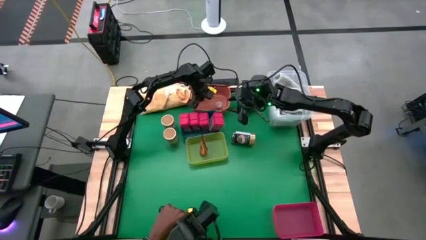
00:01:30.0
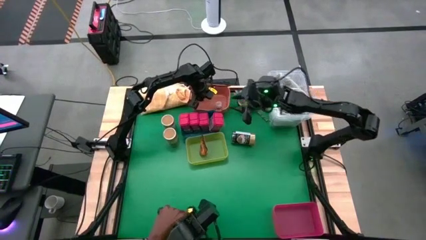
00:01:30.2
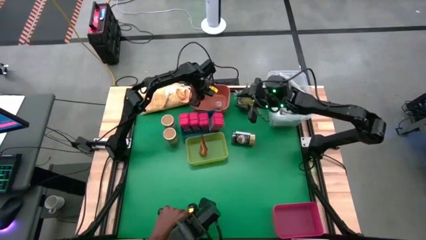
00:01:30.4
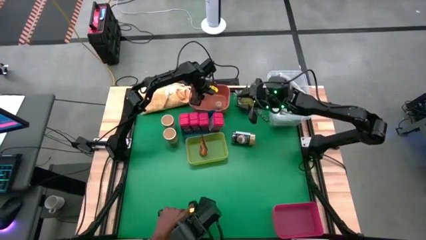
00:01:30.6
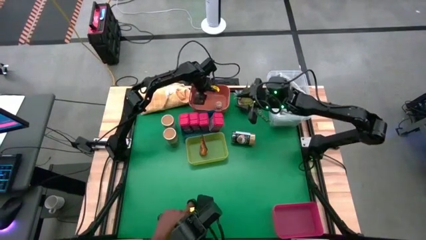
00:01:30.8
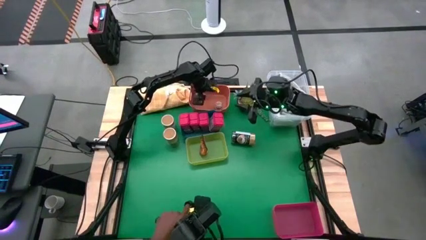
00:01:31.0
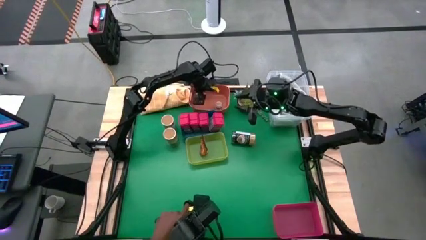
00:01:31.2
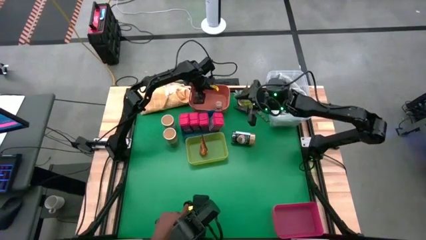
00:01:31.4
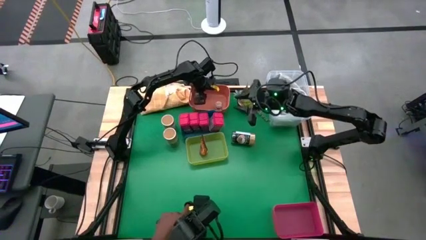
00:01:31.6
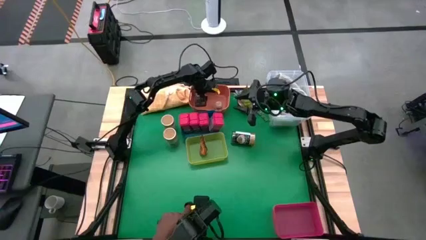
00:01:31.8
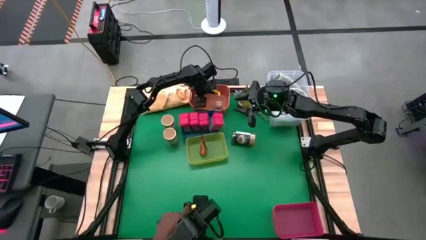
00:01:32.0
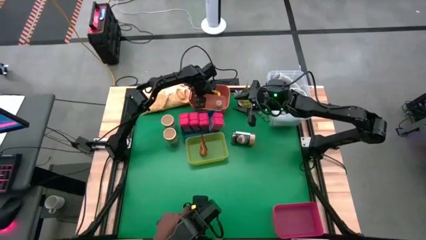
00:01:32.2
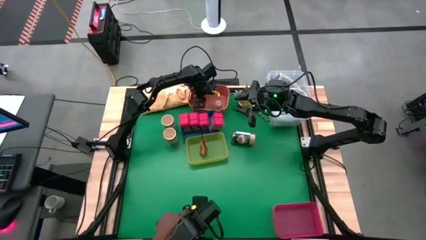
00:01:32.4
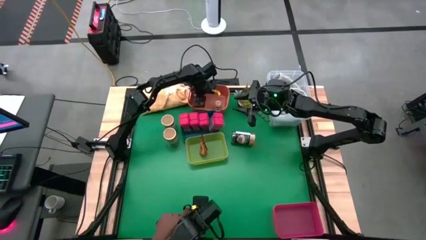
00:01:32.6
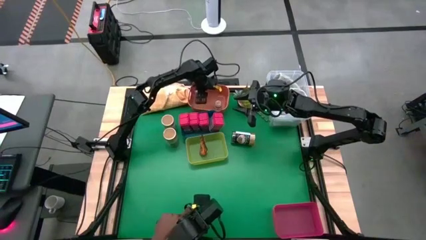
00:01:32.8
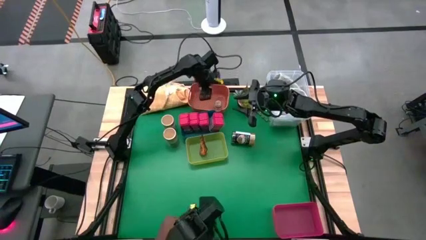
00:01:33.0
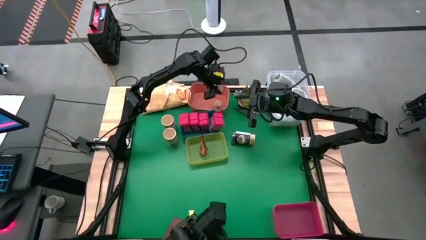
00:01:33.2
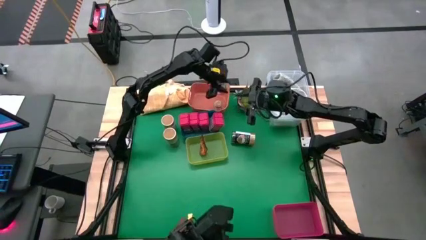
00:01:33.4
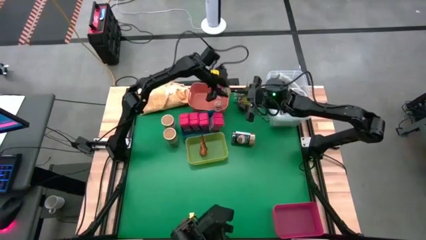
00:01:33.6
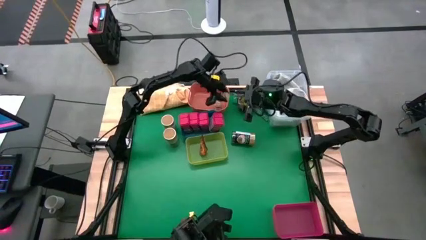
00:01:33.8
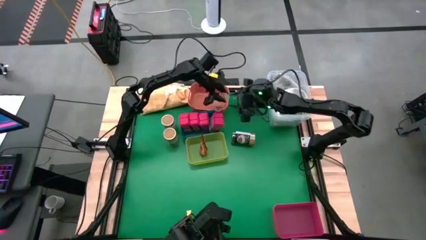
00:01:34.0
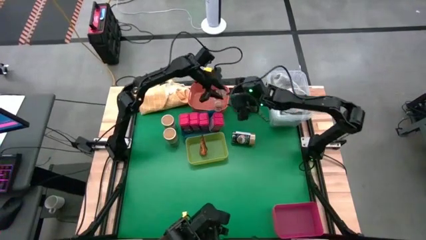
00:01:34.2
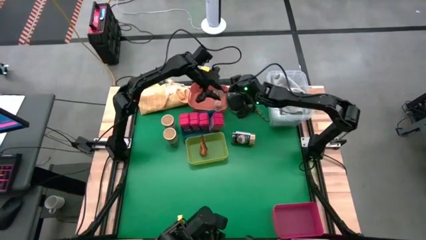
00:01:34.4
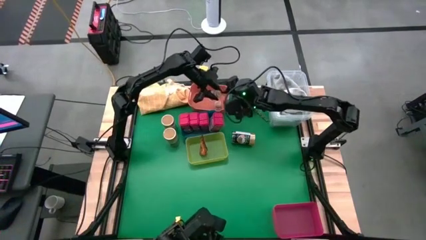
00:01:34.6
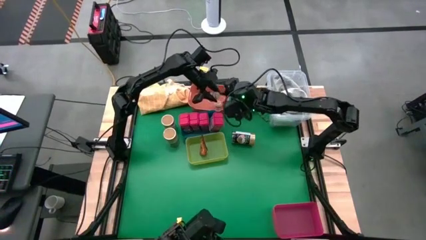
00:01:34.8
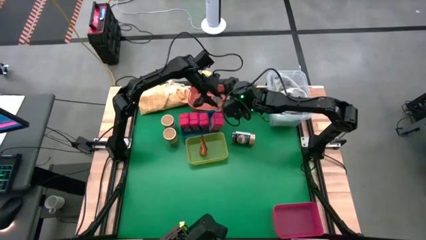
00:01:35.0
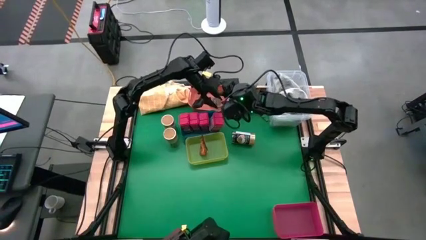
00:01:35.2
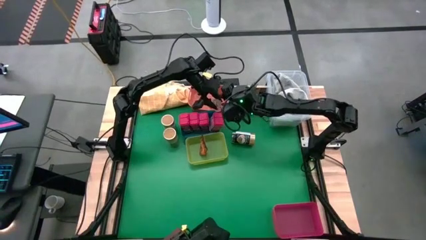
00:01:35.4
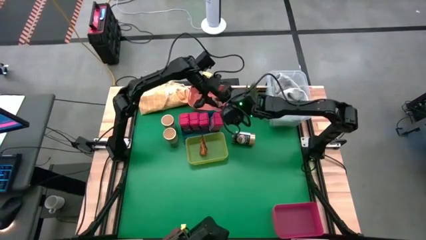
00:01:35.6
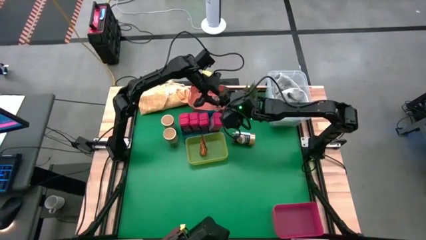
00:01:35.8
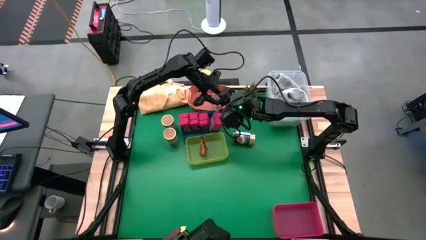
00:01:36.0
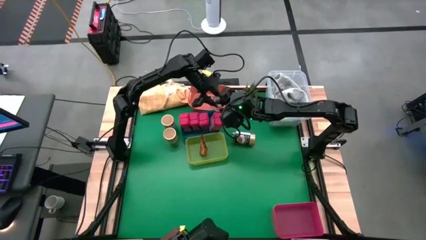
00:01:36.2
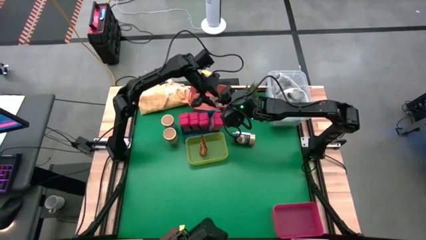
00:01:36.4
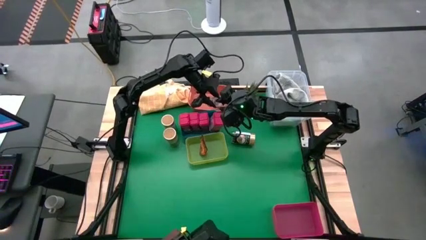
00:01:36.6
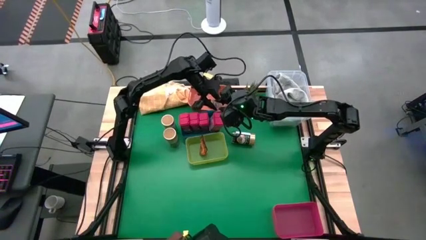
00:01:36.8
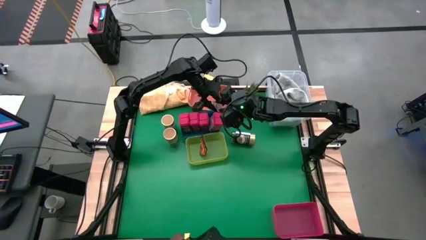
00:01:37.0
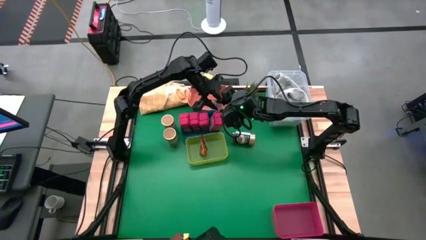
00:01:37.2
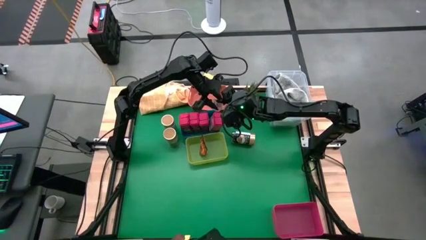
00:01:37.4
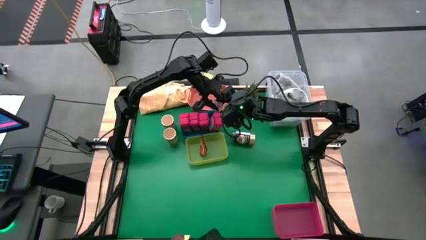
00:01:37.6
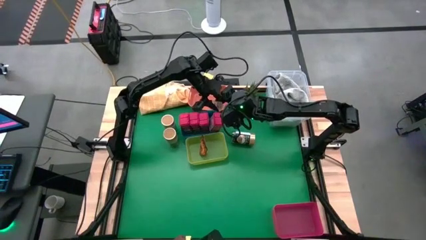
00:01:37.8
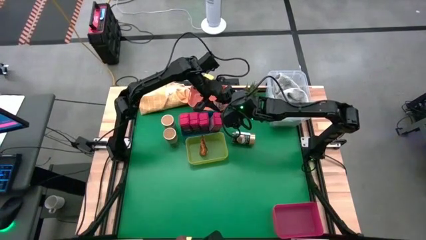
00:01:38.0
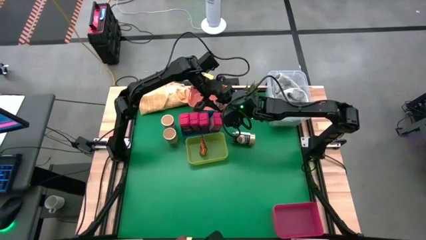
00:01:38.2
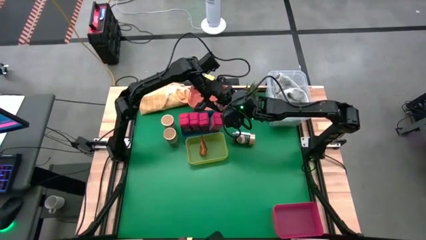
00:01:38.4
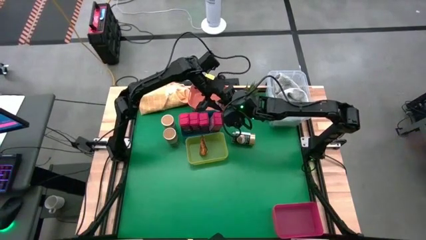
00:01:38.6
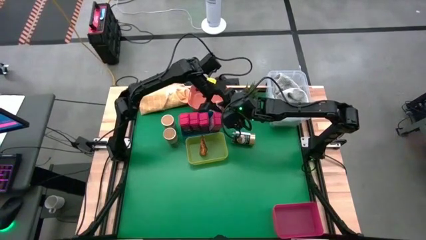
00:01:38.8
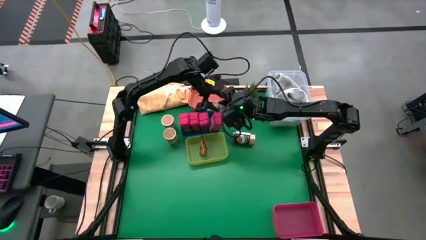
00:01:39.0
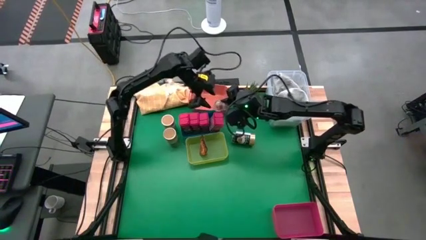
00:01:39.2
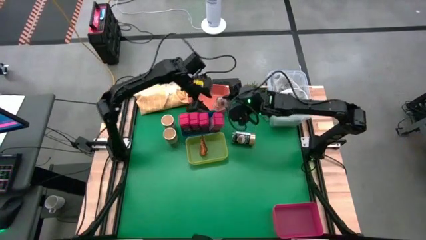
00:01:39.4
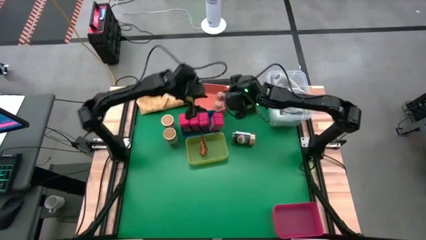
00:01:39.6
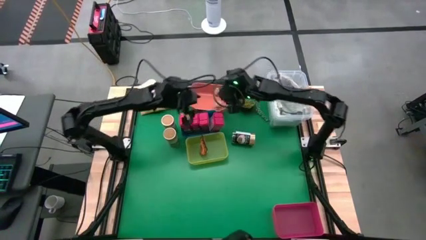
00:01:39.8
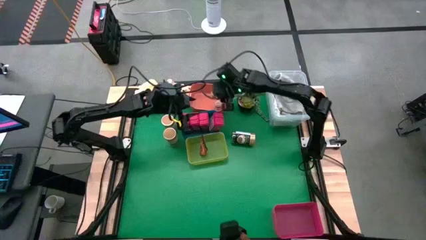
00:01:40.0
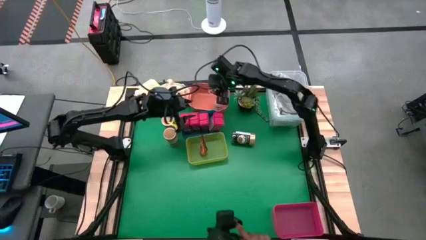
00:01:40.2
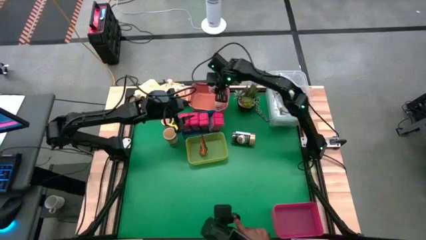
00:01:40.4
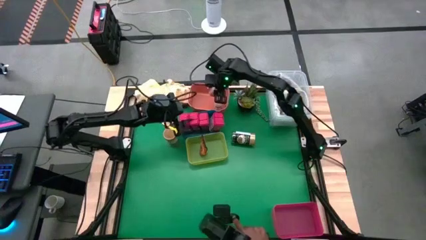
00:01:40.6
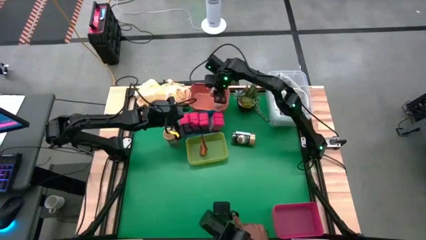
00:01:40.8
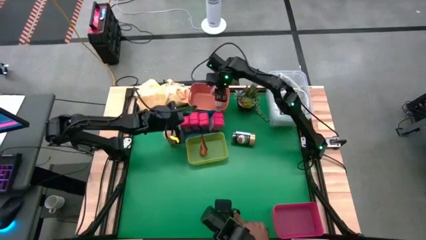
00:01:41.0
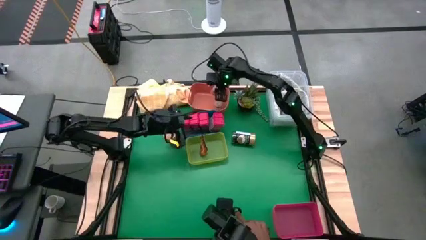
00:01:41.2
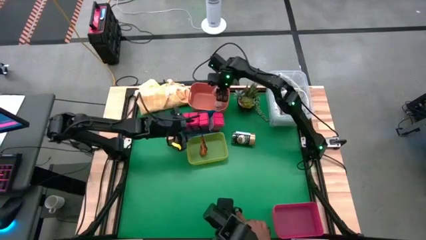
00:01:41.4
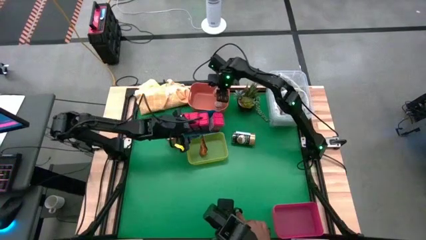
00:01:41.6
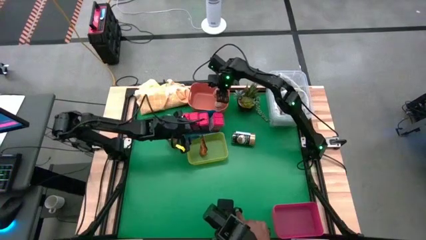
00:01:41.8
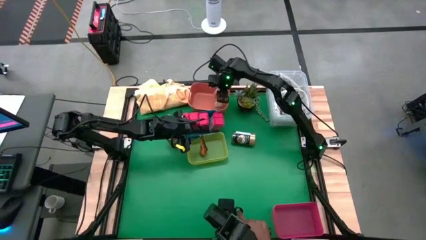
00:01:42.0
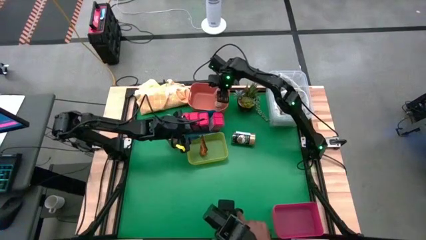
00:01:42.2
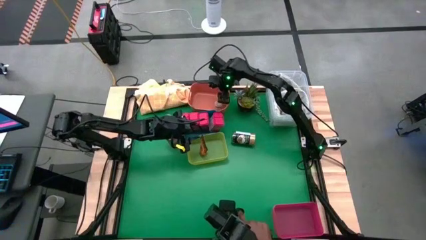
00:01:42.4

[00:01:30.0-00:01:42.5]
Task: Sort spices by type
Put the brown seasoning bottle into the orange bin

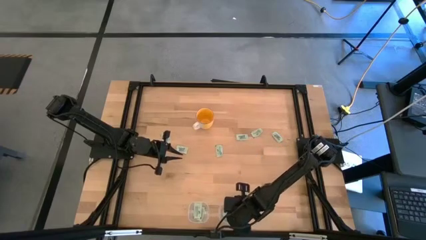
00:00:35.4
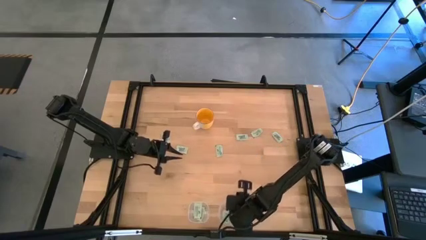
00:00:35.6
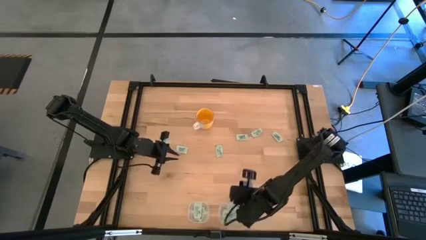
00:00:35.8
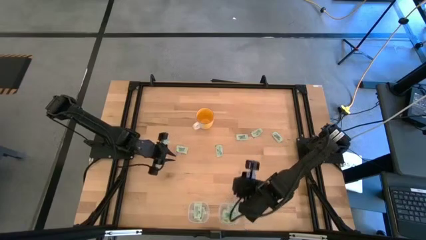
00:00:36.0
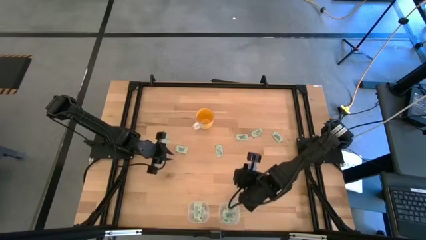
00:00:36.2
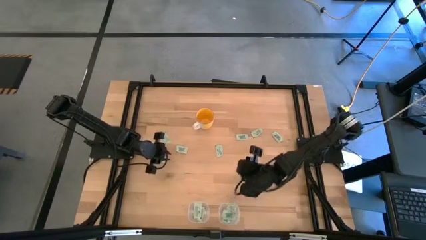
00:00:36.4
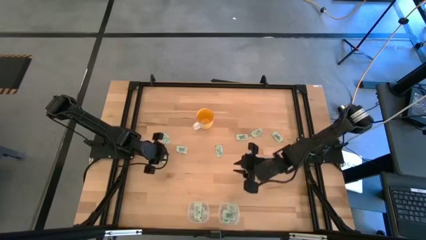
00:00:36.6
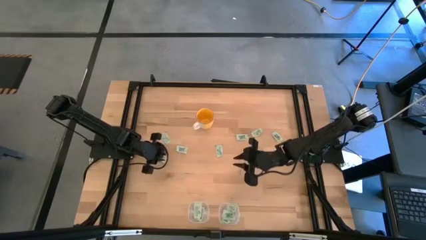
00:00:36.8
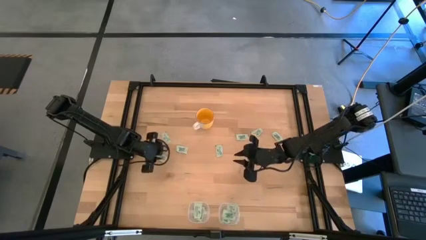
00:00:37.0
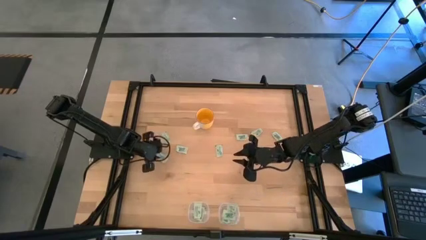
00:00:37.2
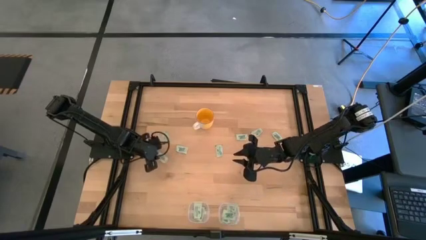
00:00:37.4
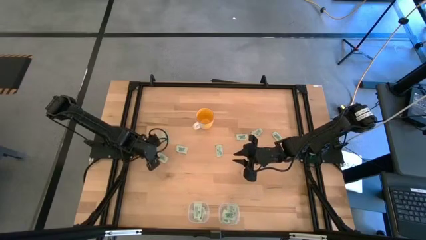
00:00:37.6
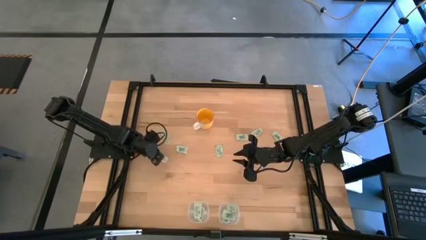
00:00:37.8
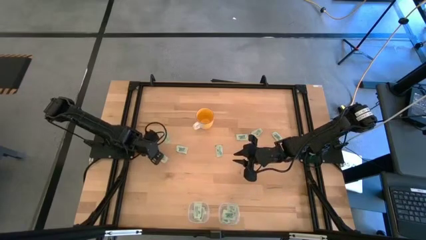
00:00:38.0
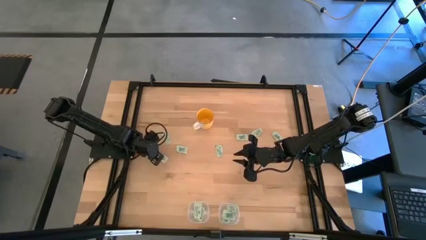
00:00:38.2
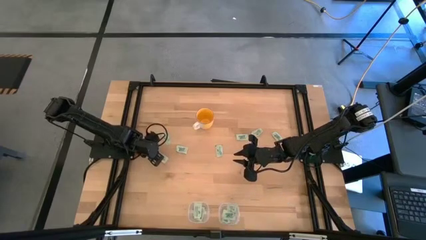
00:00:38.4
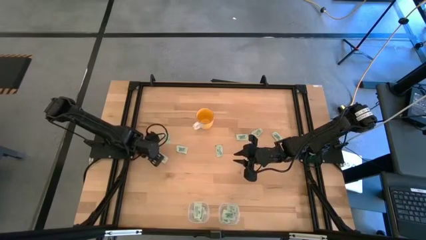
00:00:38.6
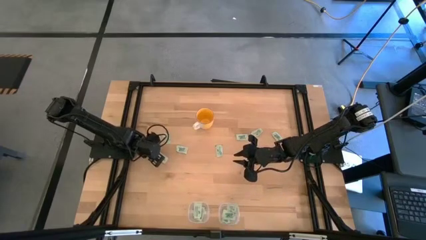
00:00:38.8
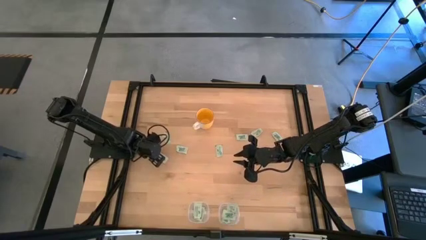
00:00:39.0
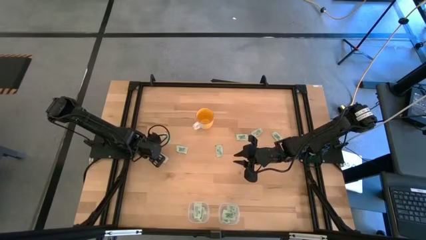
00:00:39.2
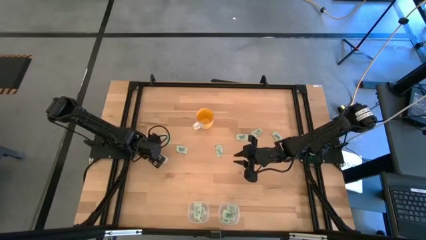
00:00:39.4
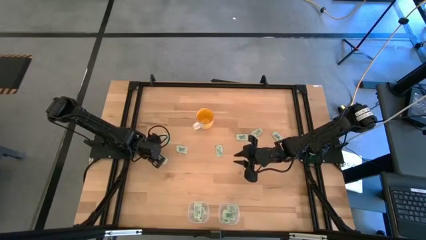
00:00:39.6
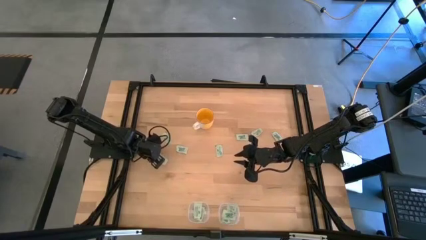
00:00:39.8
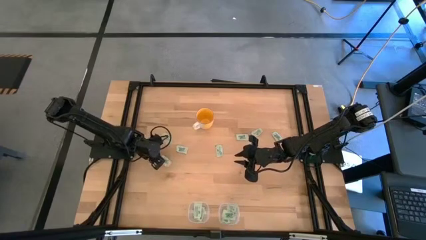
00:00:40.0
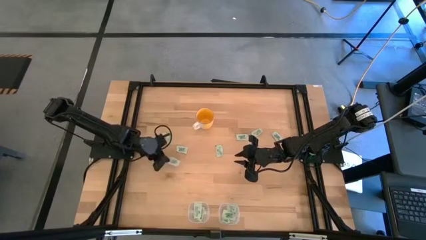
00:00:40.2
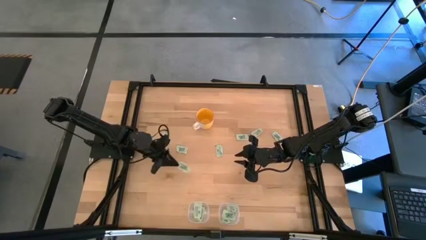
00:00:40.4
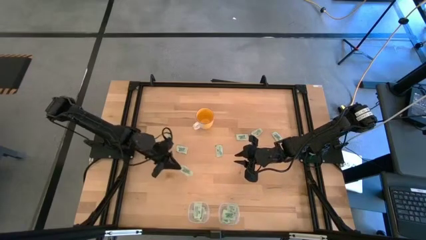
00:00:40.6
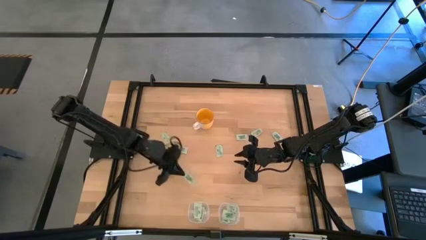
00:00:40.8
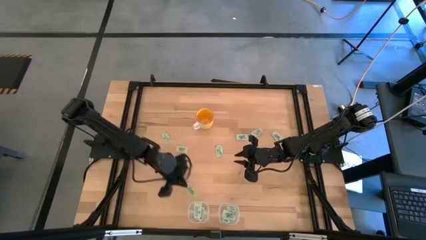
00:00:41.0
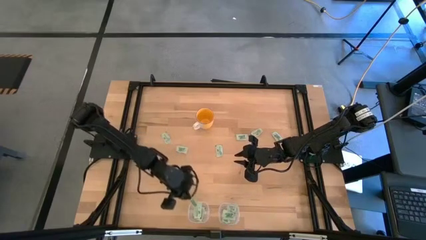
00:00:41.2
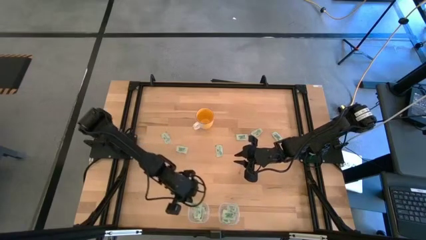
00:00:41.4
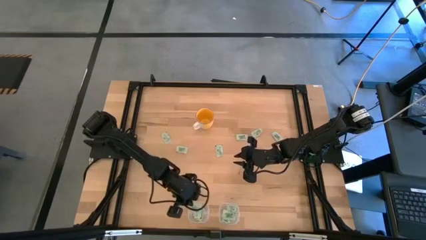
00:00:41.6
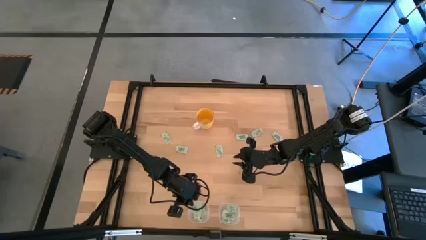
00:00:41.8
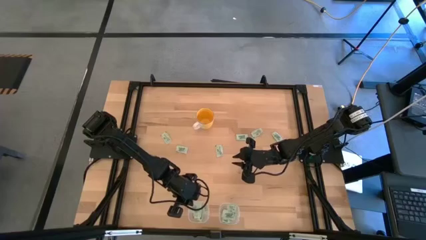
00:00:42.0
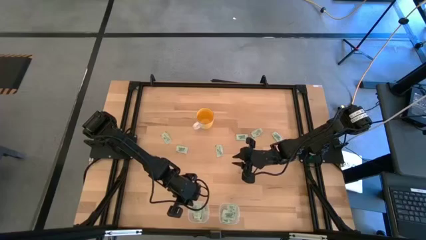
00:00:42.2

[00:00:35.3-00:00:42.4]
Task: Pick and place items into bin
Put the green stevia packet into the left transparent bin
